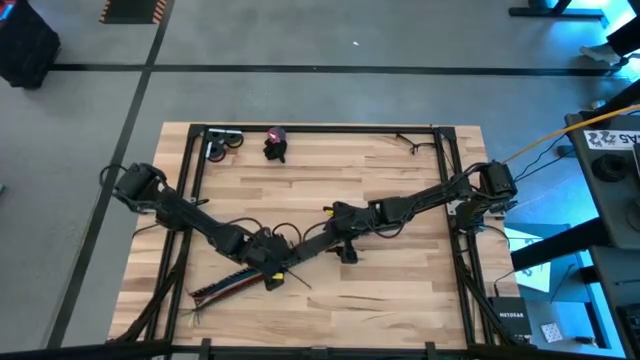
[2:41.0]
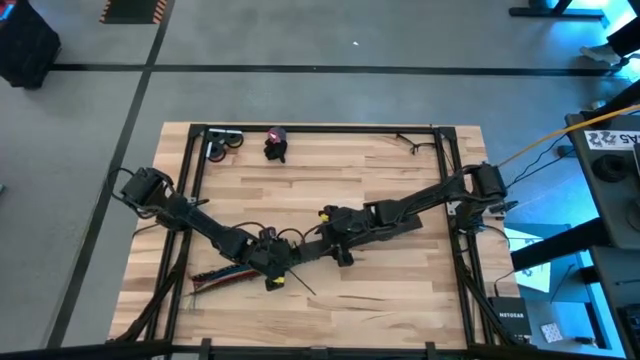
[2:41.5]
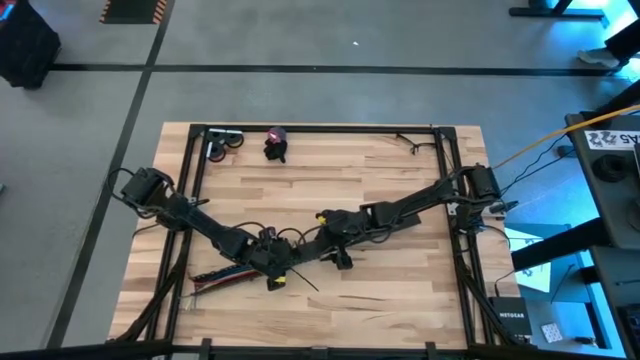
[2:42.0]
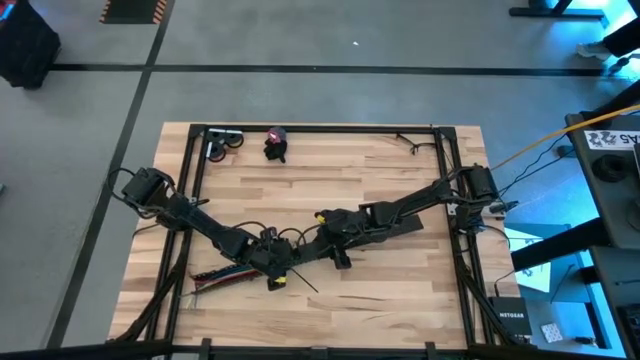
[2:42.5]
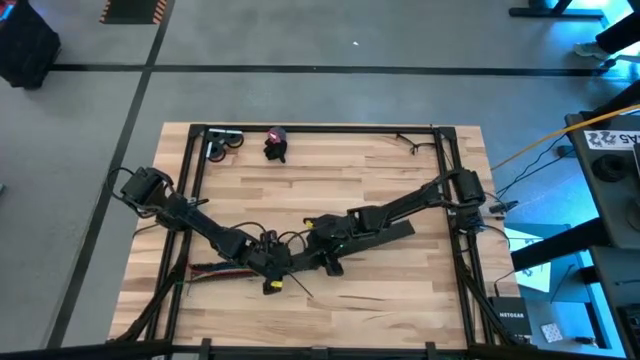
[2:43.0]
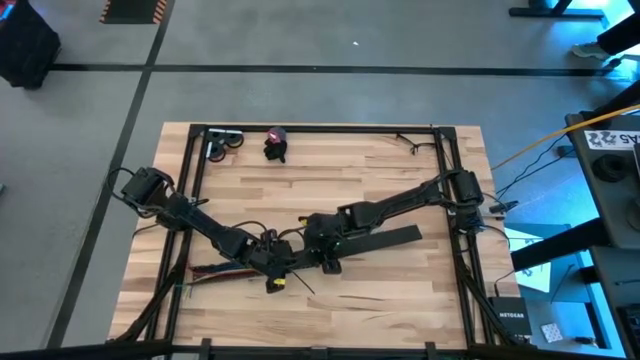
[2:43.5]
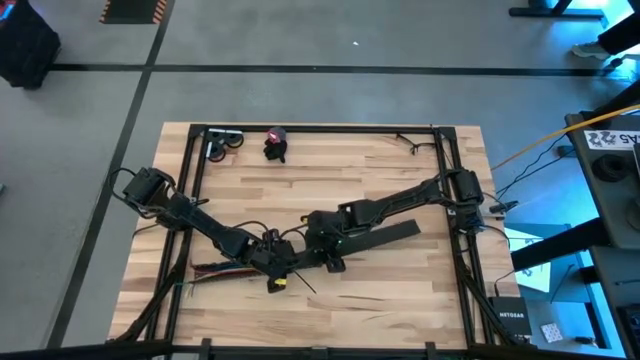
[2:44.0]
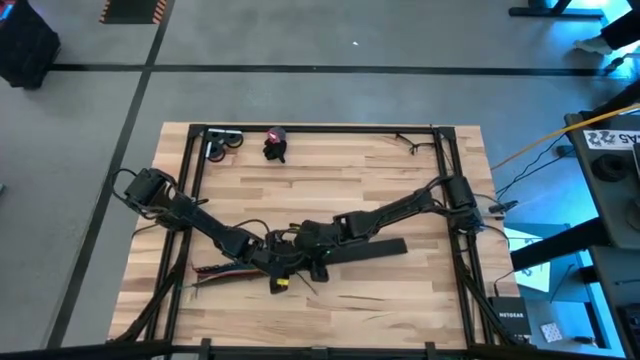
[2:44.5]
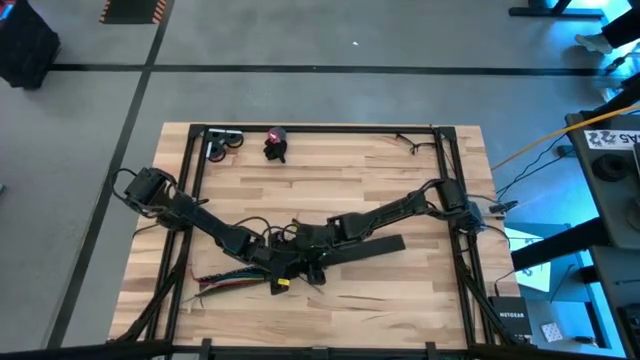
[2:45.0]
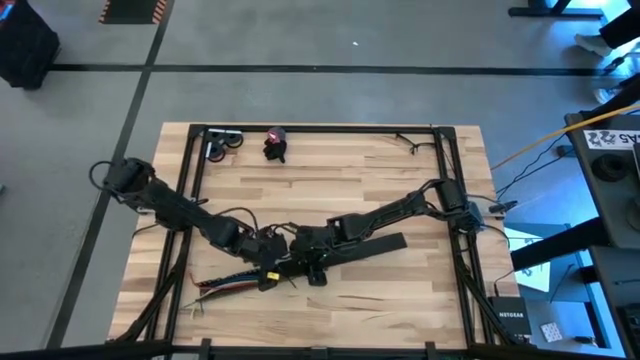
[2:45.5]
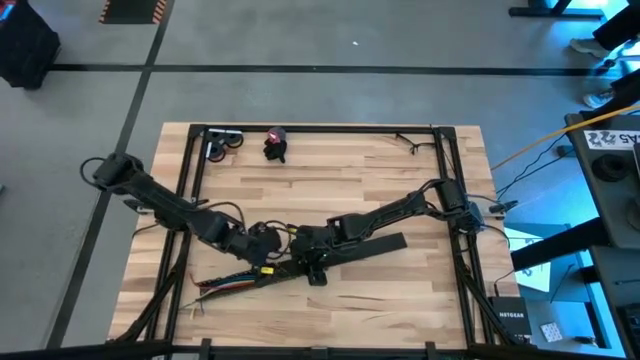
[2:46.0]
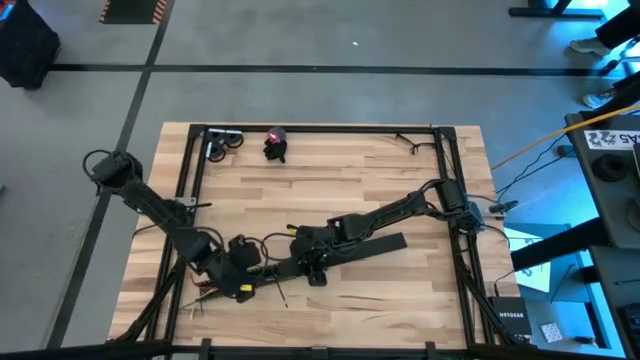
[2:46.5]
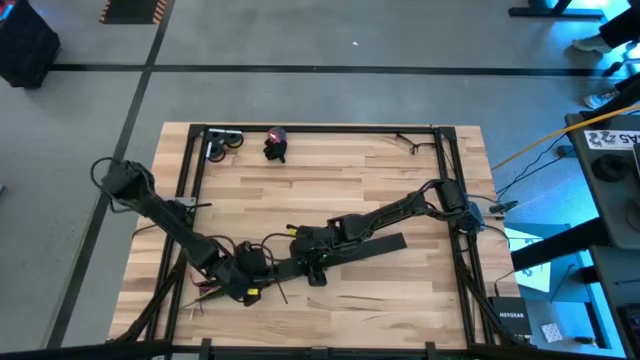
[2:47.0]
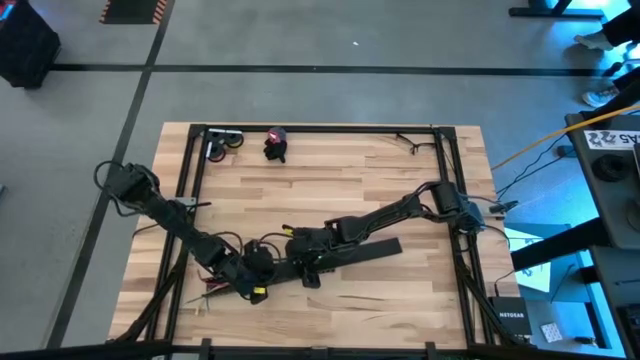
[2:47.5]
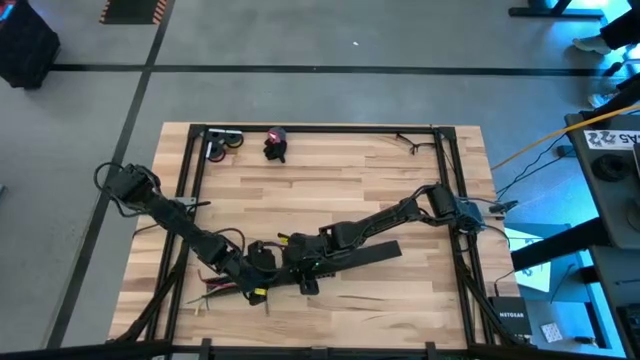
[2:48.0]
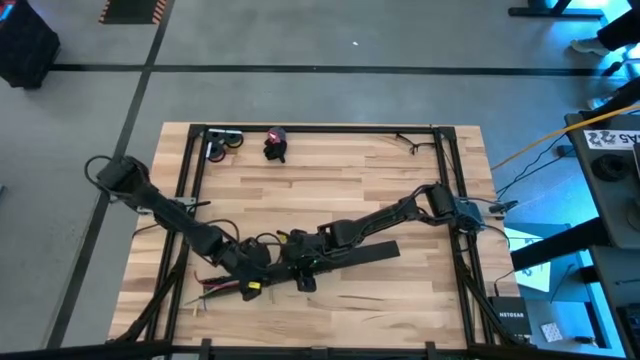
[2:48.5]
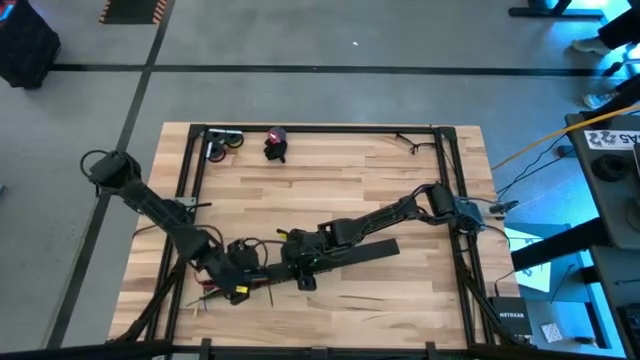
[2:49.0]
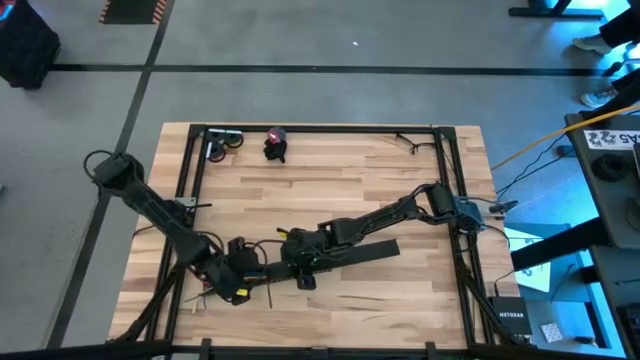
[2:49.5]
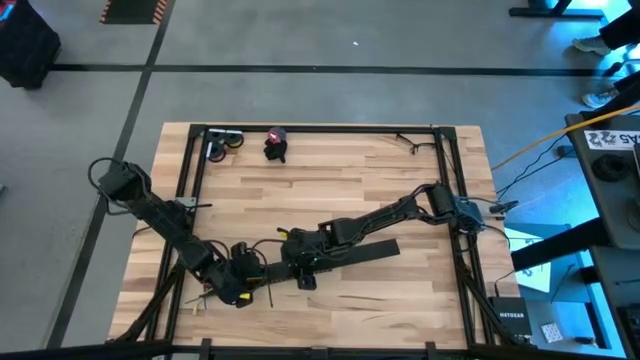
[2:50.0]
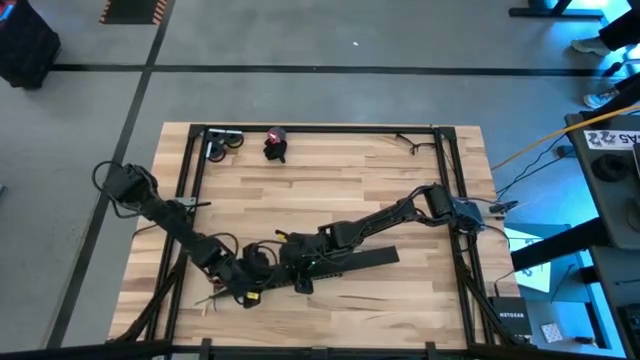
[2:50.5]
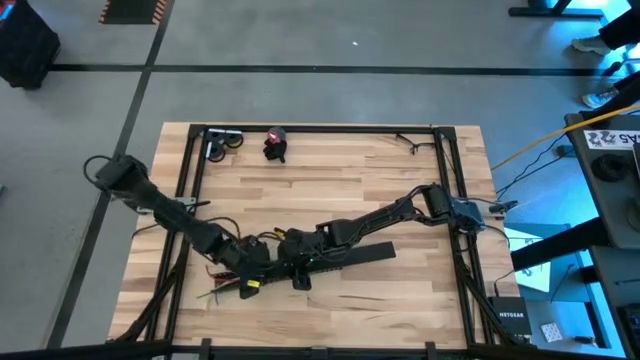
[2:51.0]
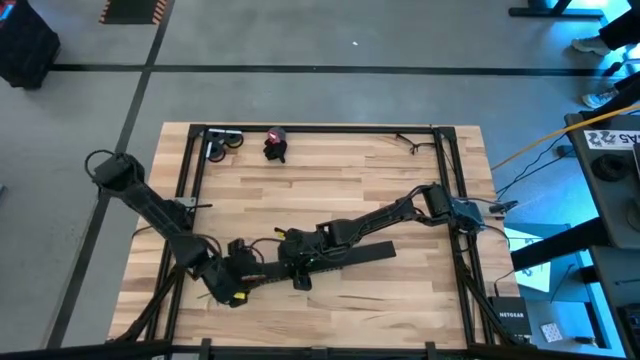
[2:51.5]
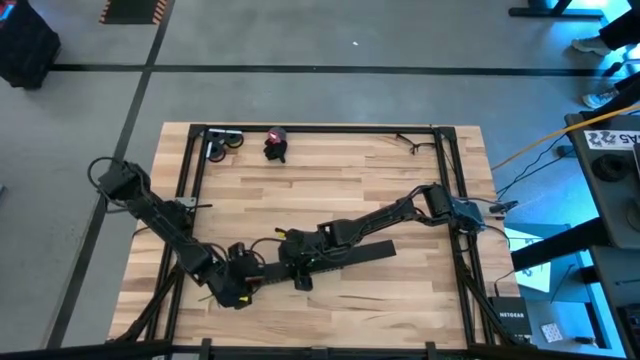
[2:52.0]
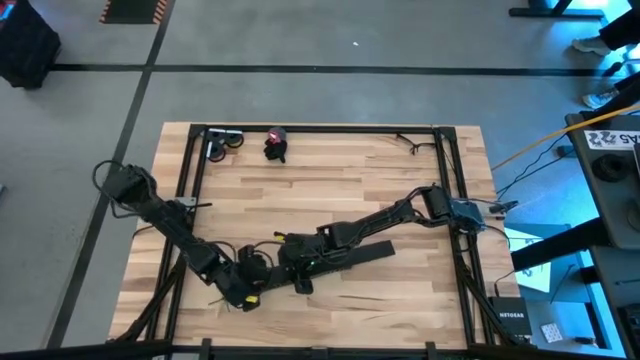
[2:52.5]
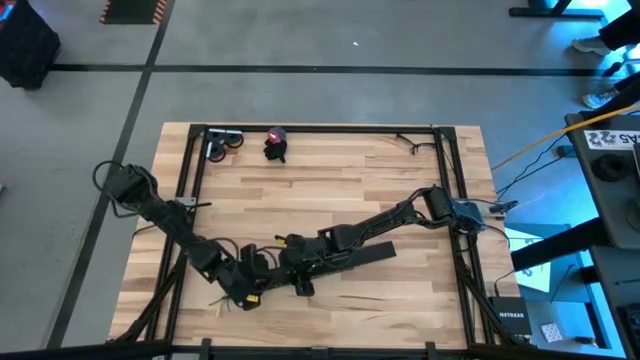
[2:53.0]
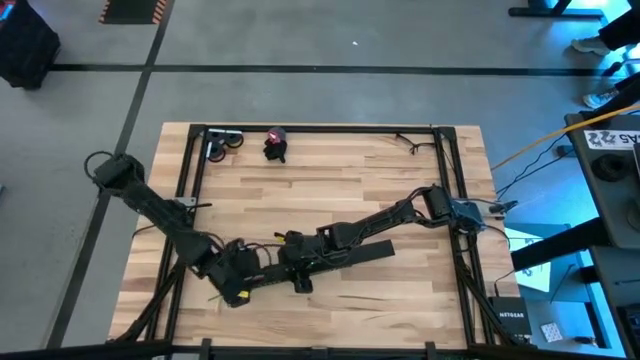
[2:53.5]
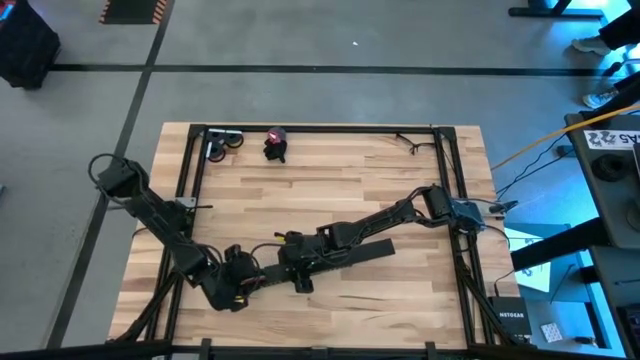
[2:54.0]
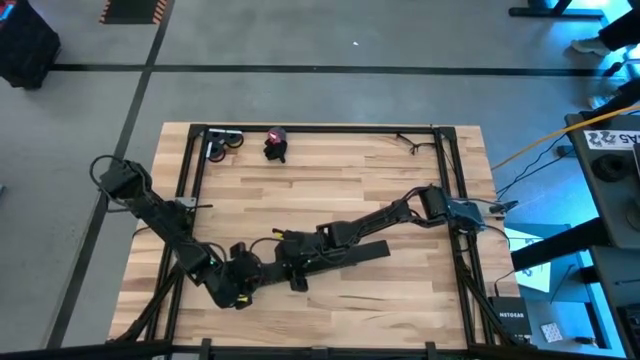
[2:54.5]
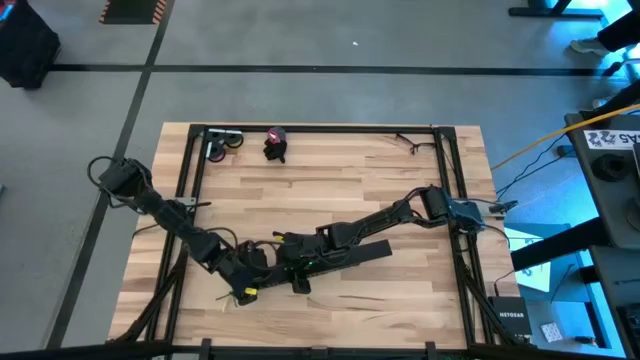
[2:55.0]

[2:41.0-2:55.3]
Task: Ziptie cables
Close the black cable duct using the black cable duct lid

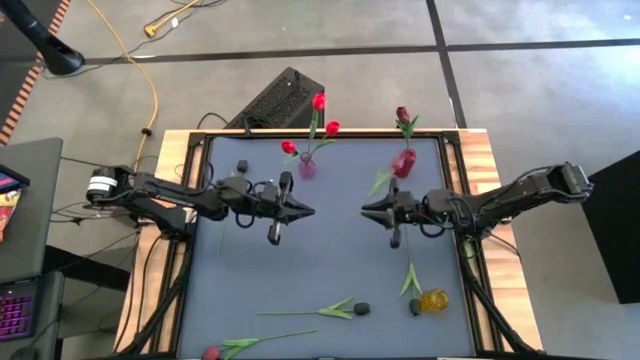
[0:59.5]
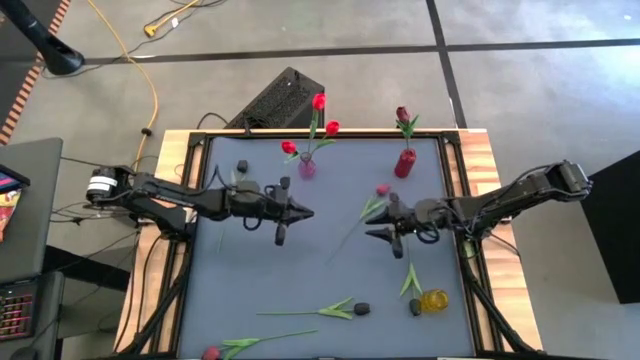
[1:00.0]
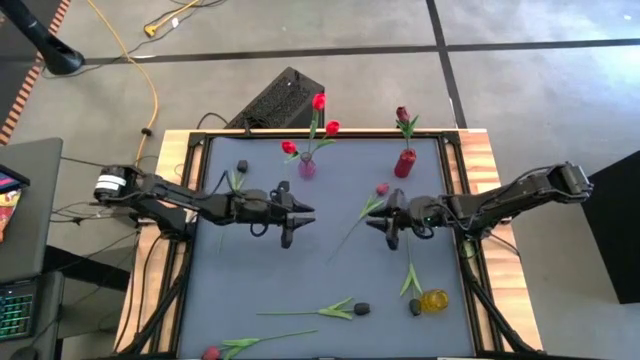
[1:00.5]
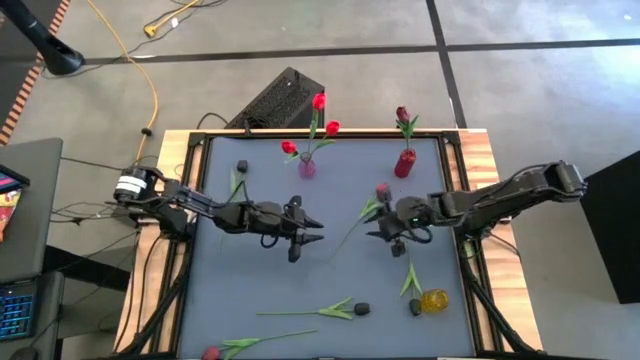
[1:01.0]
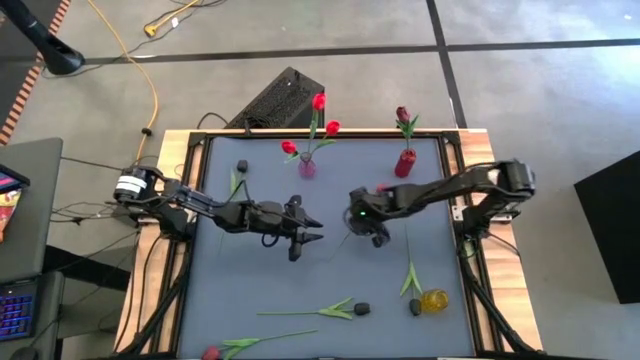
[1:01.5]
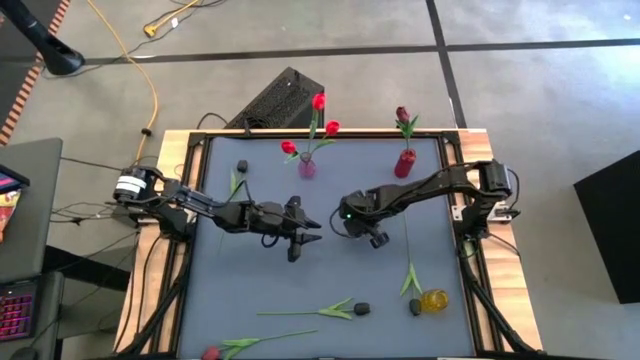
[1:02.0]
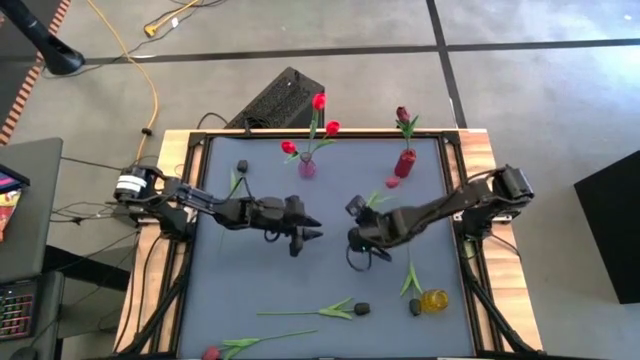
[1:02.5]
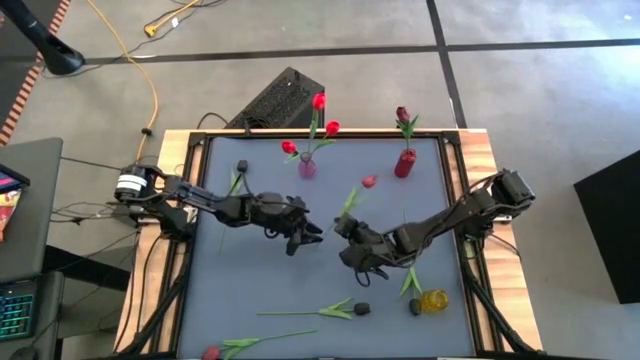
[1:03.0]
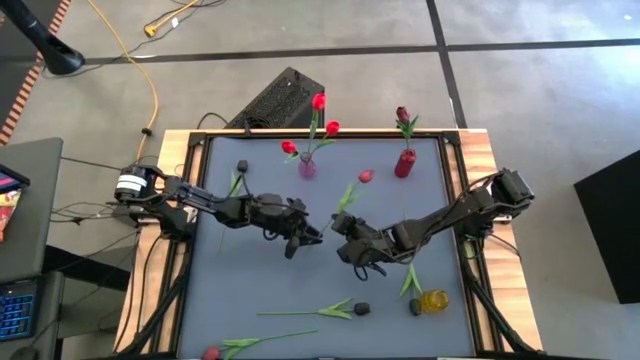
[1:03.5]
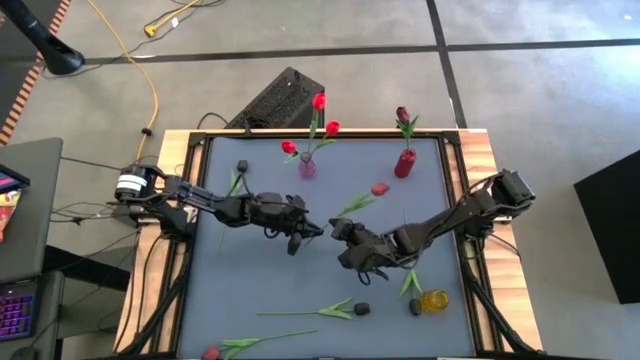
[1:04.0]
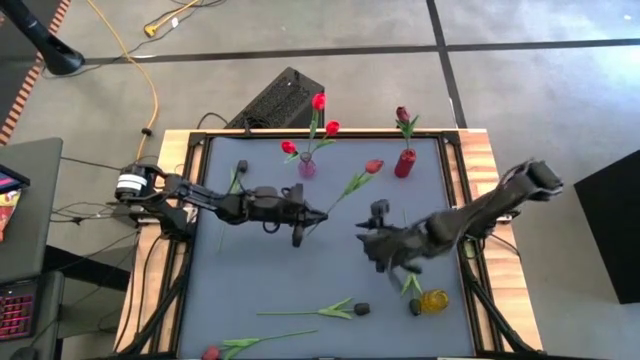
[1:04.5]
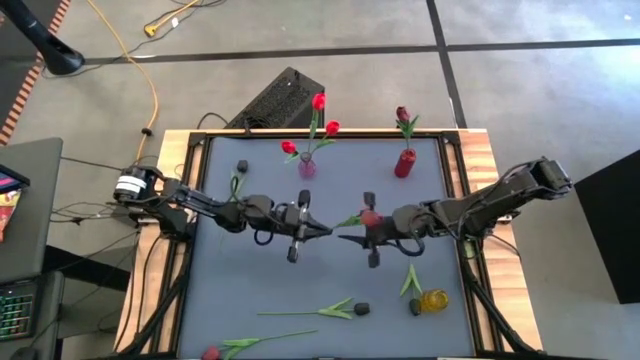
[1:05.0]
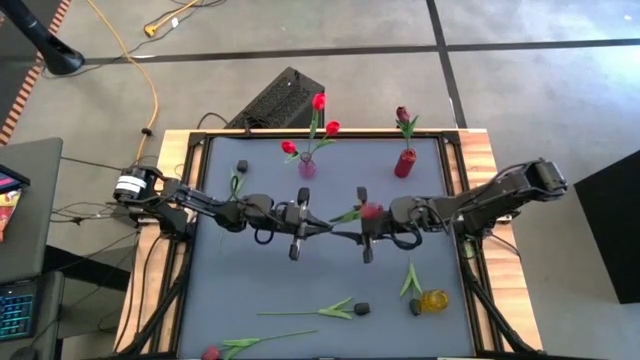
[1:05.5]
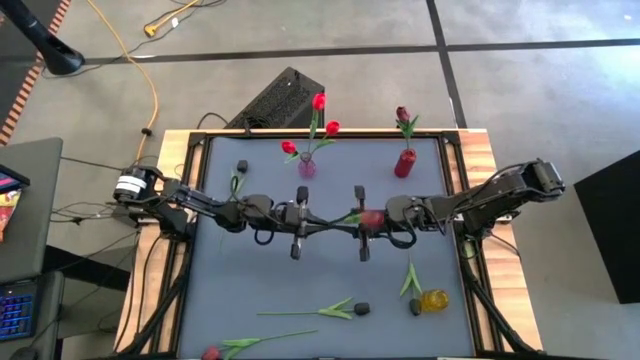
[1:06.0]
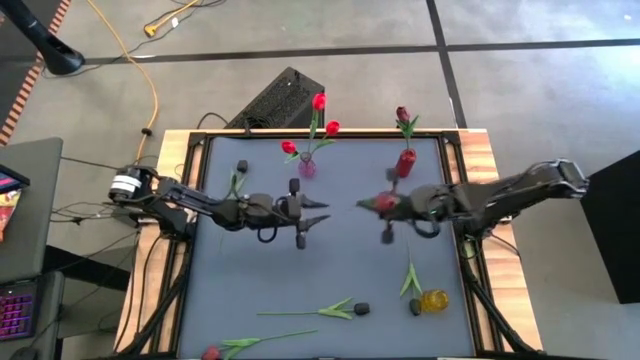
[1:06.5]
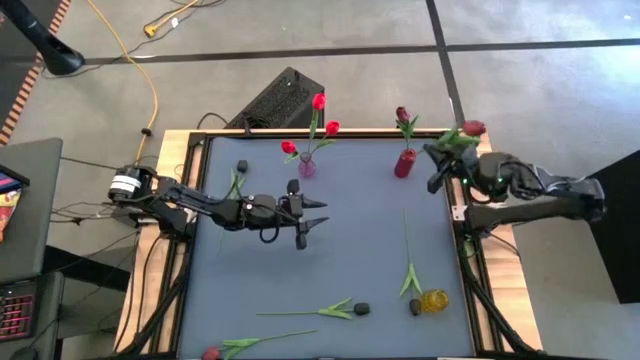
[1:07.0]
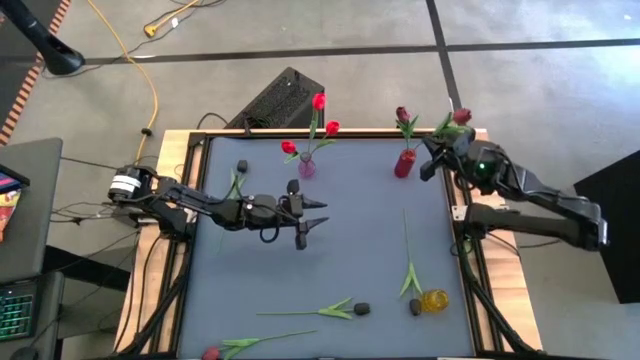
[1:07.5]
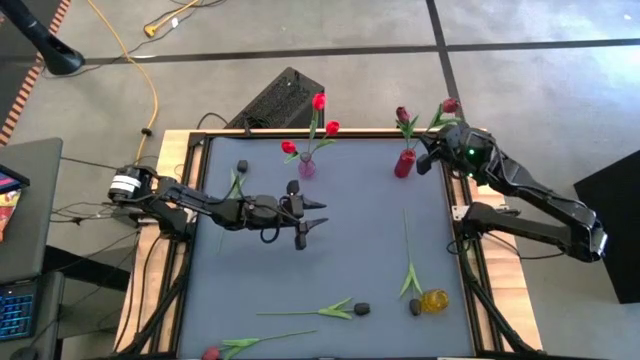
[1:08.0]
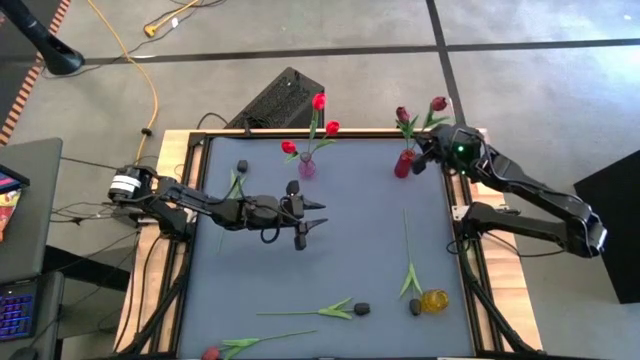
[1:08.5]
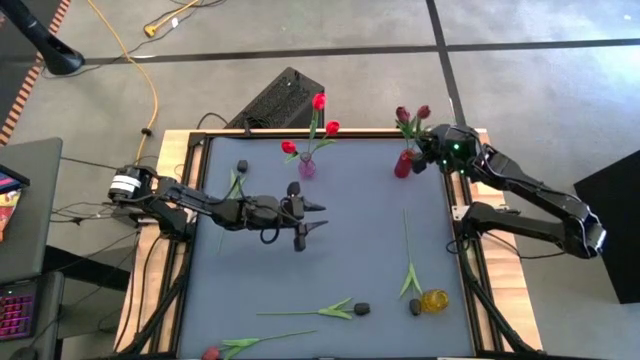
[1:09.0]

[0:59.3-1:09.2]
Task: Sort flowers into vase by color
Put the top red flower into the red vase
